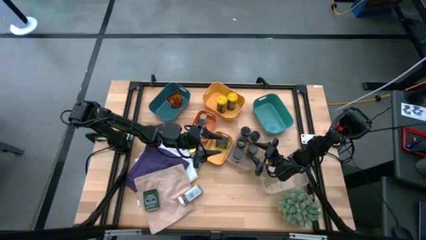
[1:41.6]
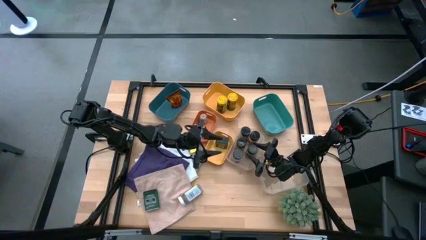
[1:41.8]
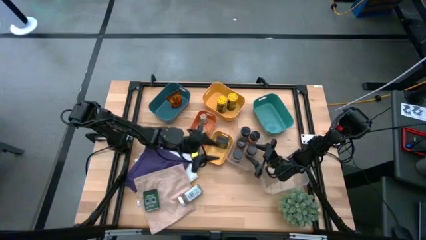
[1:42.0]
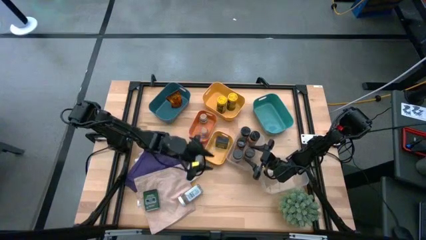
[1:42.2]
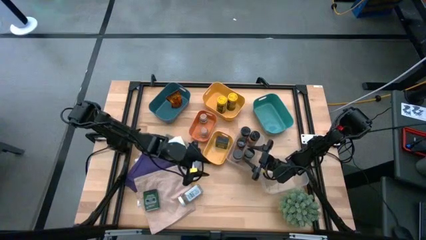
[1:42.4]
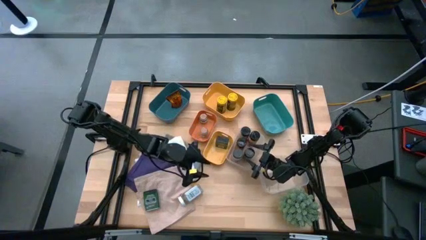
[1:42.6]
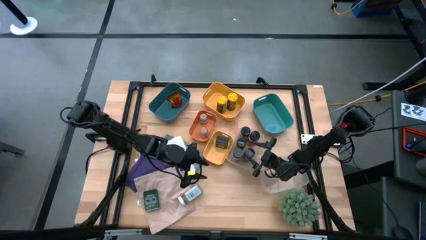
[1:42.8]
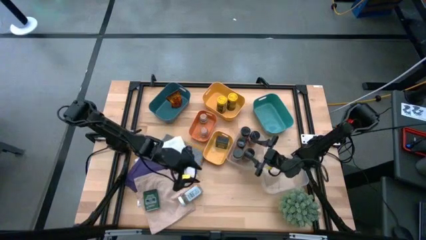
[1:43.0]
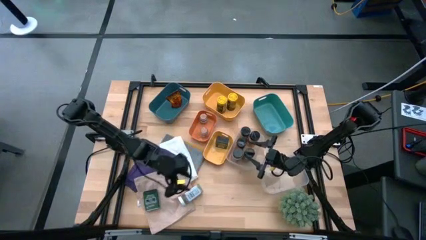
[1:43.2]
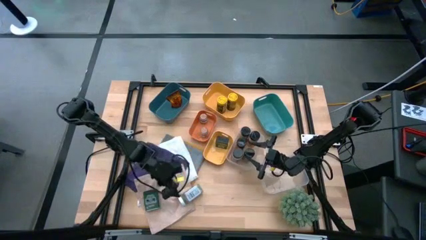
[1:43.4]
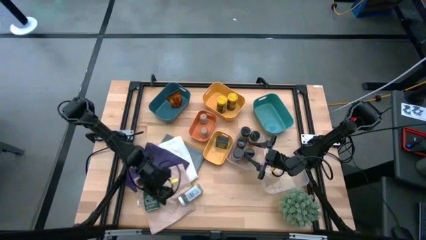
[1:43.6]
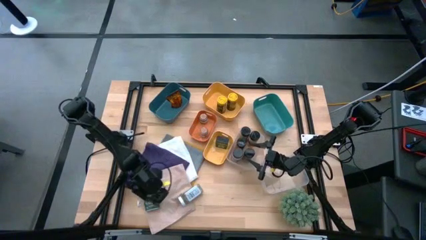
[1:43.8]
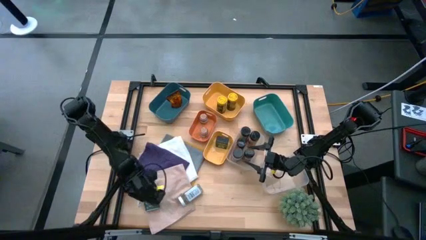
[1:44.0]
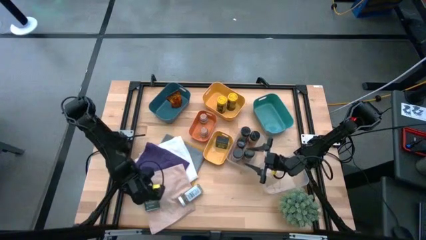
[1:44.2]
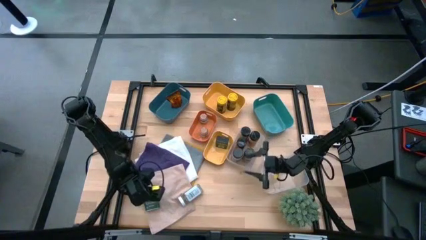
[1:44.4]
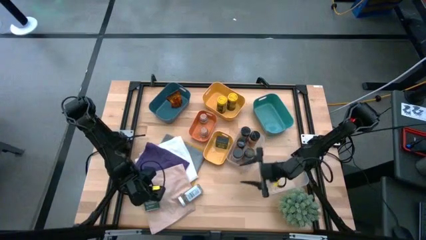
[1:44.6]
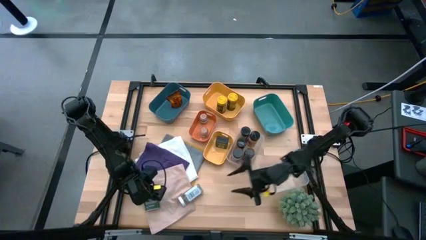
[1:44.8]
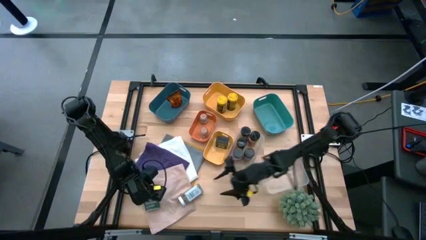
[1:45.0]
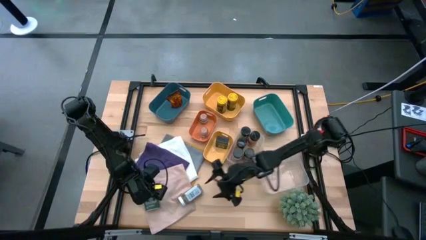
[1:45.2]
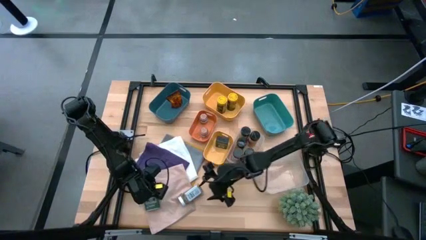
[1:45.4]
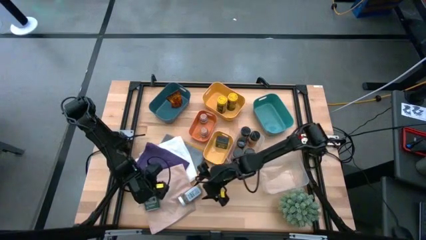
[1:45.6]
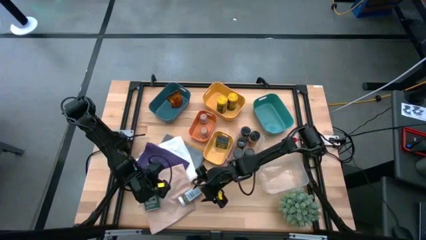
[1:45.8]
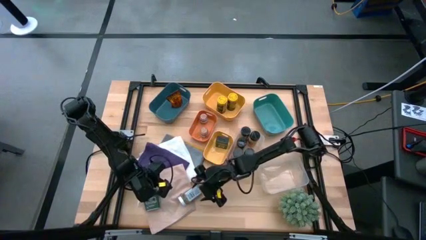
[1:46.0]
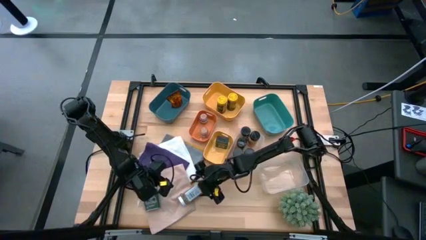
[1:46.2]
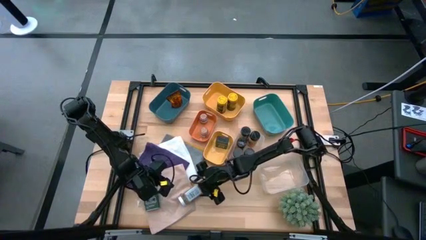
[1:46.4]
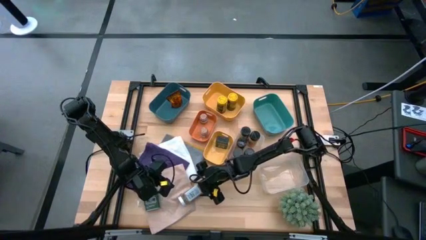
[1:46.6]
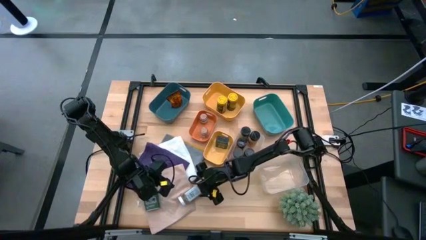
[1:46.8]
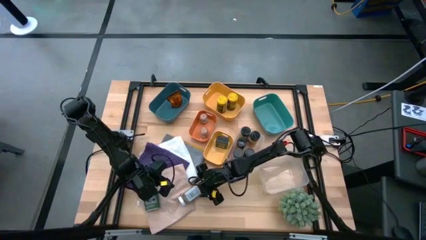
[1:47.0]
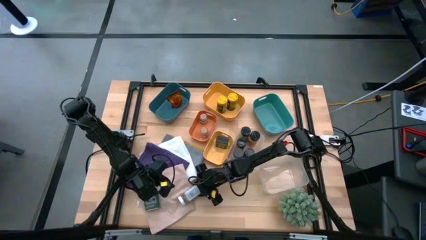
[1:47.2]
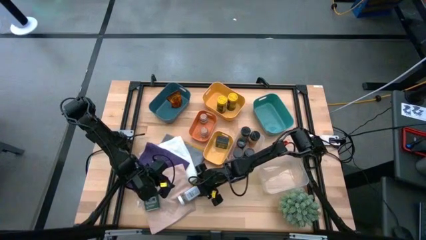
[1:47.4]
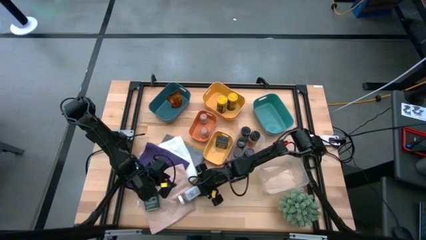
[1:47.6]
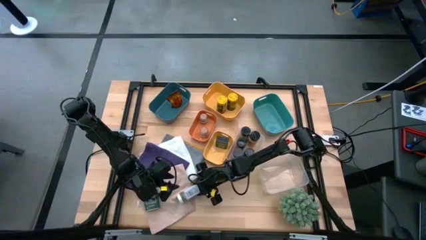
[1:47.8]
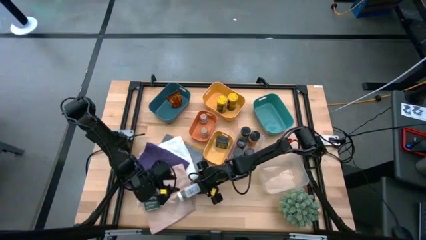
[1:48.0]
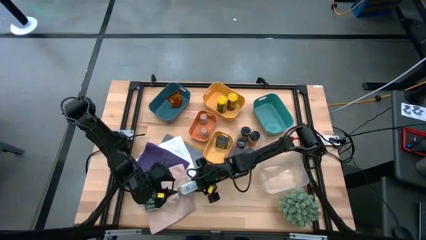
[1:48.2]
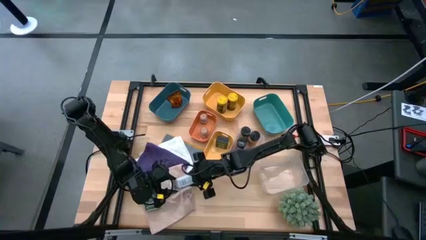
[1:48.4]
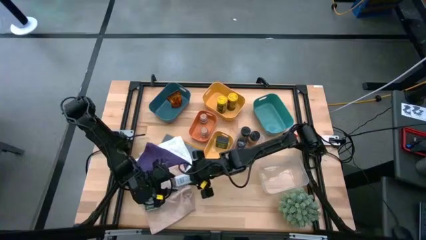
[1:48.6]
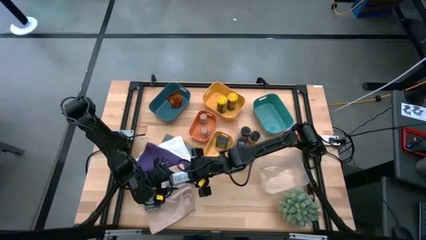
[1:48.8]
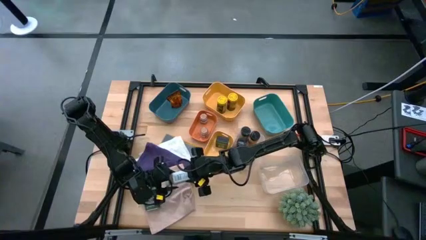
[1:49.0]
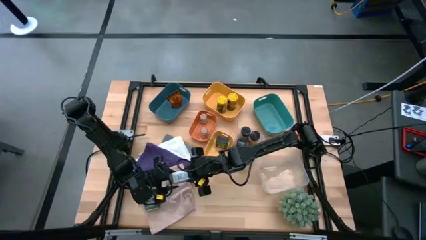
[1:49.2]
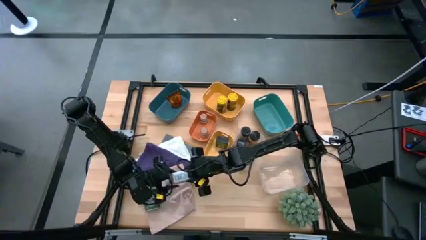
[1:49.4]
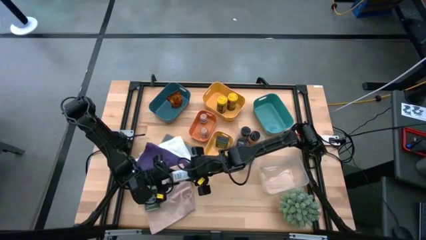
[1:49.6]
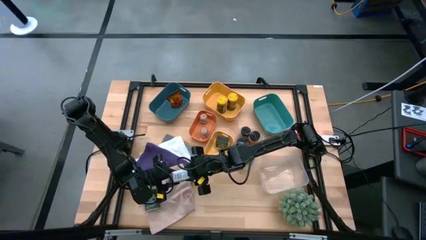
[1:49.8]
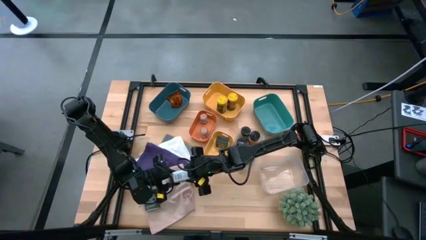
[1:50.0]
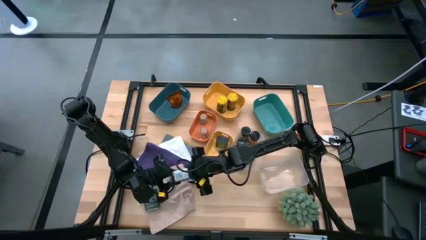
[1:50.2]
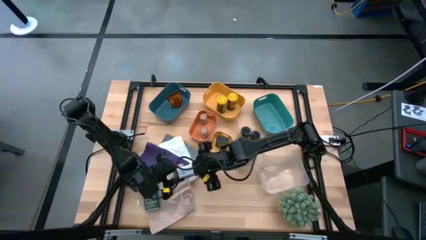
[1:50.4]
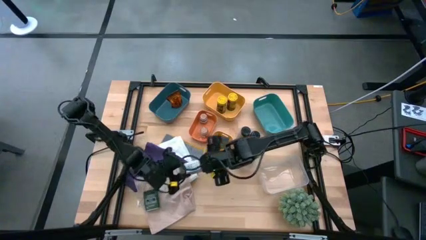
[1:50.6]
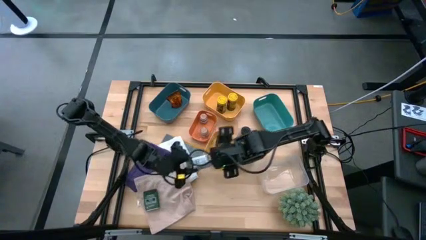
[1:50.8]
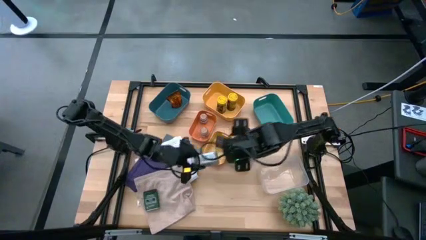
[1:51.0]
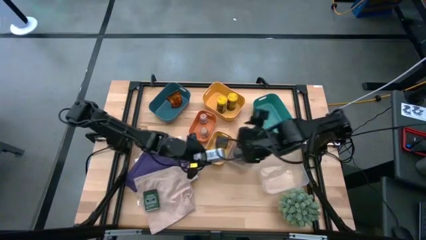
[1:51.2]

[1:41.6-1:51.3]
Task: Sort spices by type
Put the white seasoning bottle into the green bin

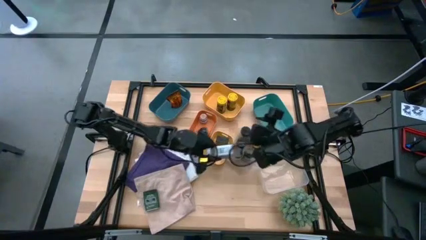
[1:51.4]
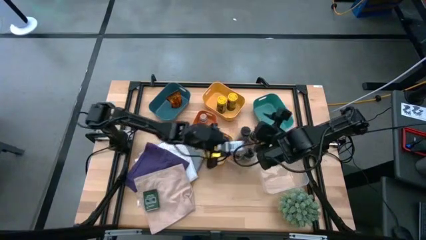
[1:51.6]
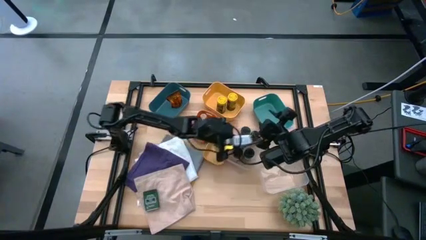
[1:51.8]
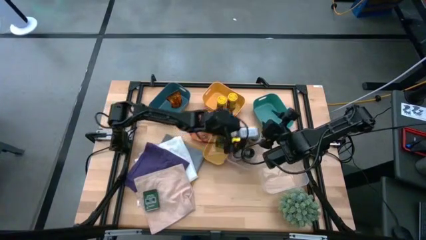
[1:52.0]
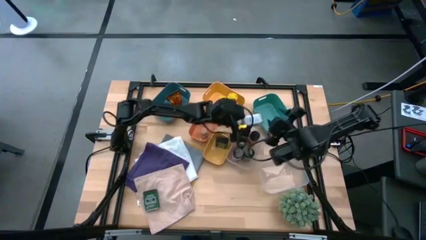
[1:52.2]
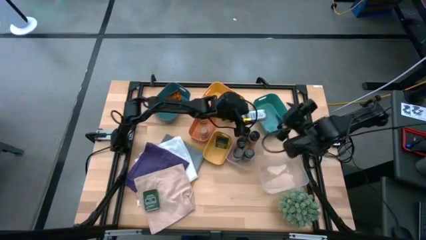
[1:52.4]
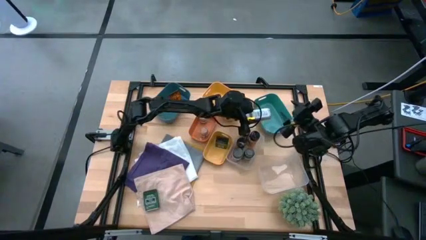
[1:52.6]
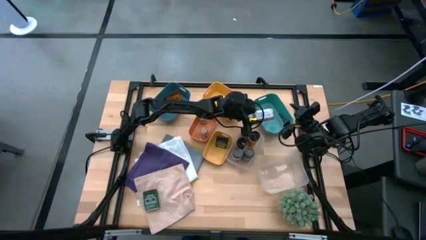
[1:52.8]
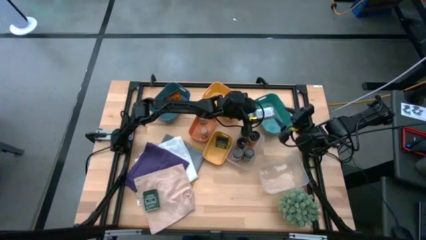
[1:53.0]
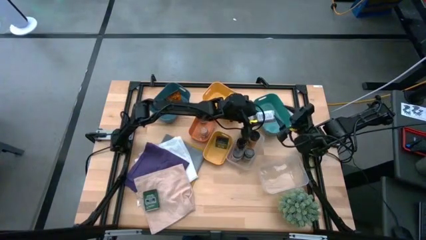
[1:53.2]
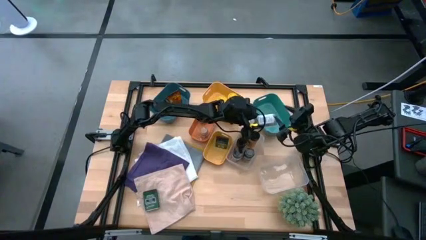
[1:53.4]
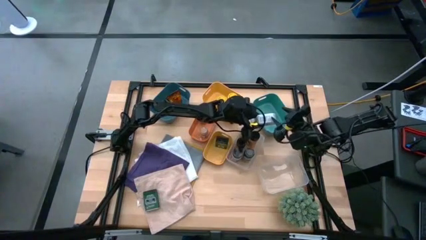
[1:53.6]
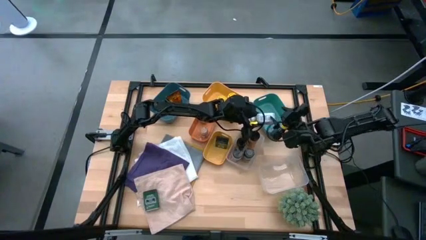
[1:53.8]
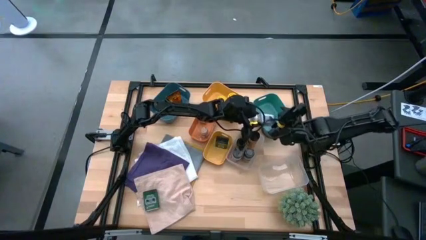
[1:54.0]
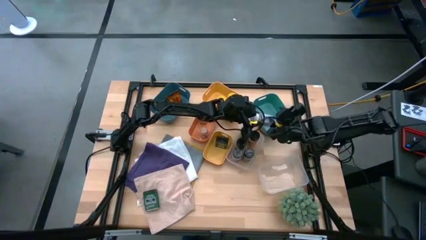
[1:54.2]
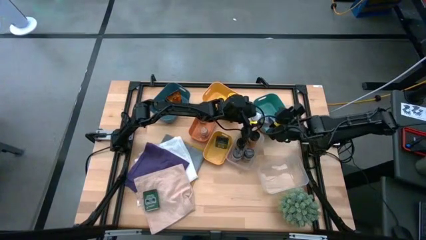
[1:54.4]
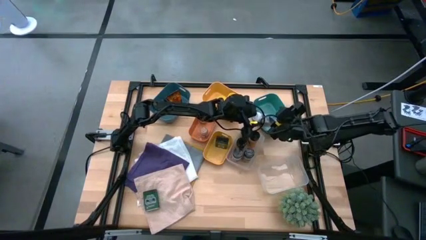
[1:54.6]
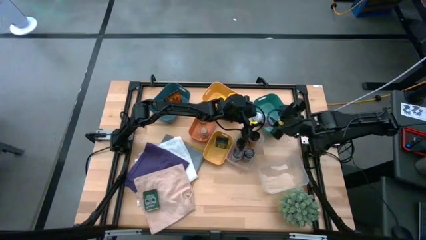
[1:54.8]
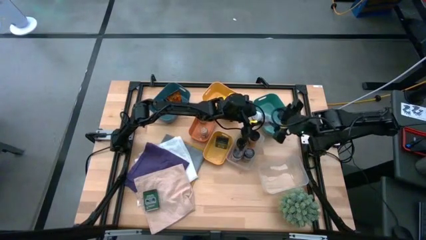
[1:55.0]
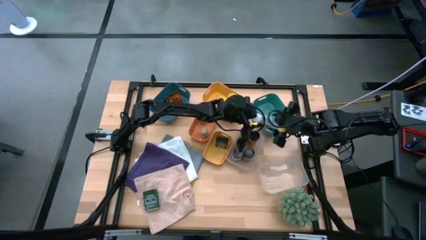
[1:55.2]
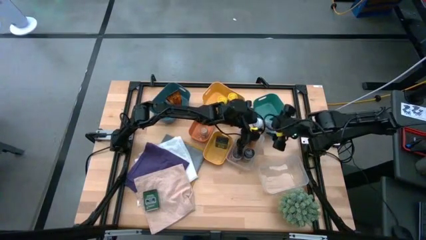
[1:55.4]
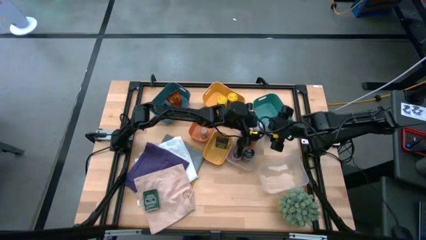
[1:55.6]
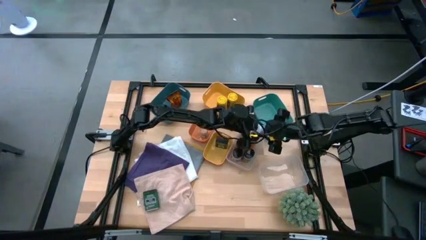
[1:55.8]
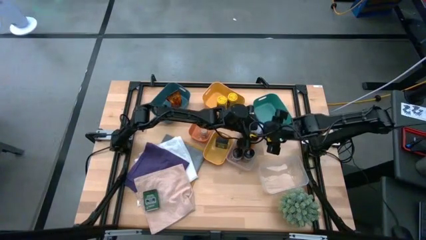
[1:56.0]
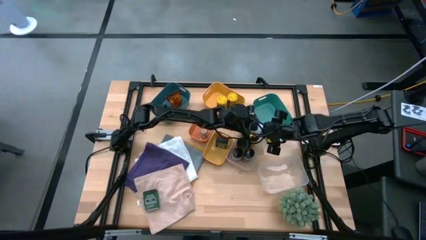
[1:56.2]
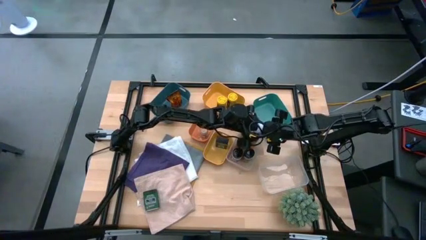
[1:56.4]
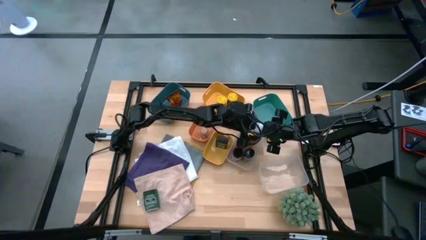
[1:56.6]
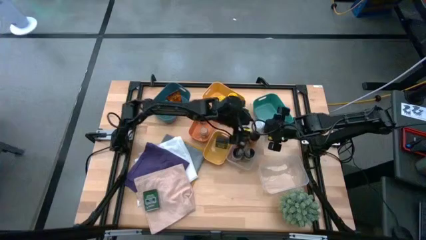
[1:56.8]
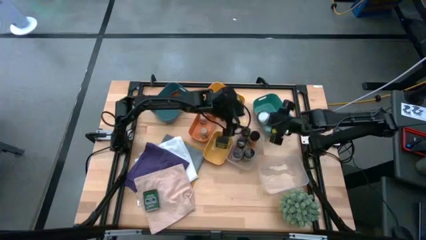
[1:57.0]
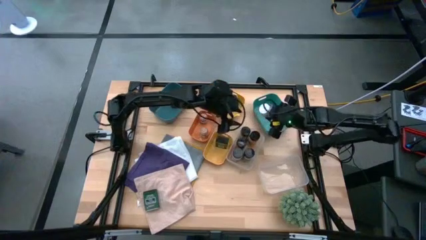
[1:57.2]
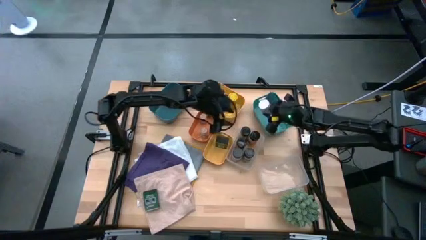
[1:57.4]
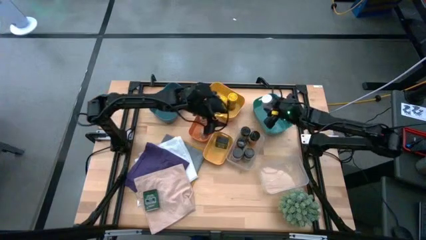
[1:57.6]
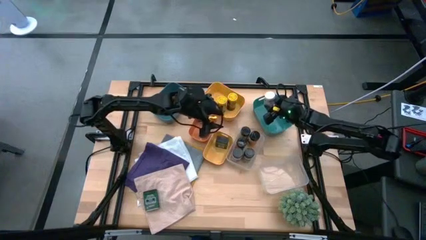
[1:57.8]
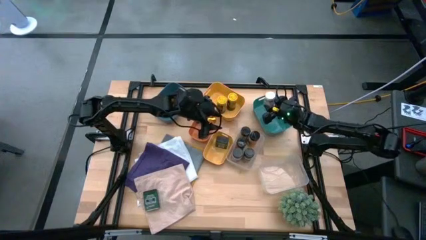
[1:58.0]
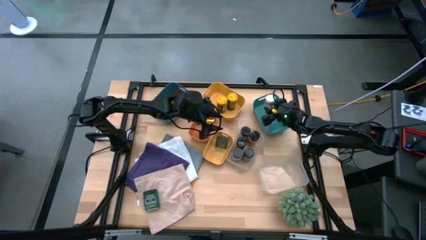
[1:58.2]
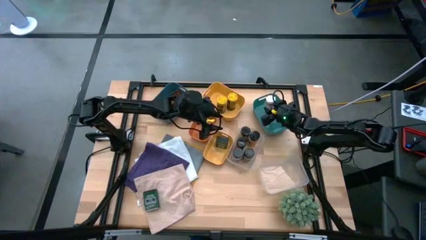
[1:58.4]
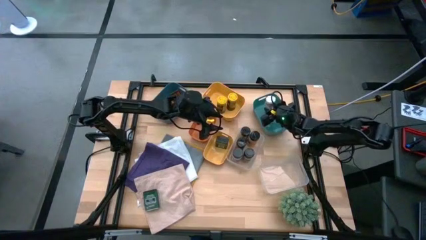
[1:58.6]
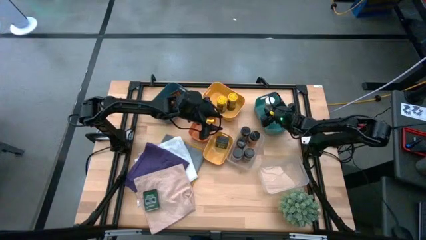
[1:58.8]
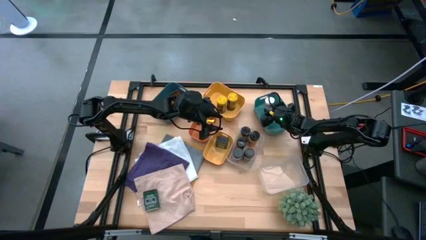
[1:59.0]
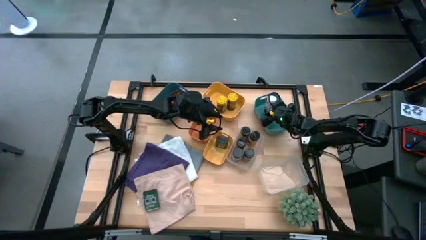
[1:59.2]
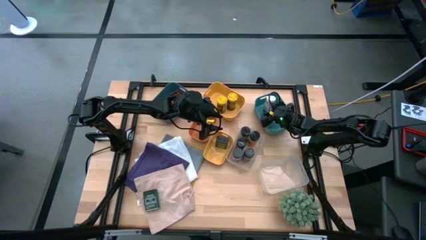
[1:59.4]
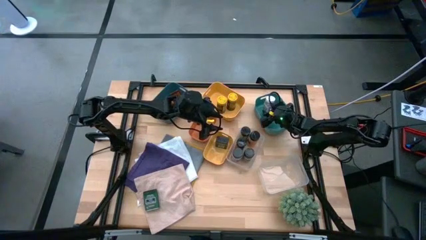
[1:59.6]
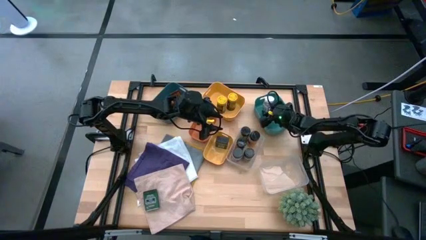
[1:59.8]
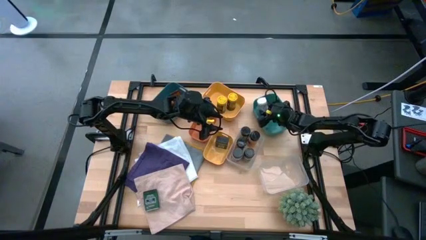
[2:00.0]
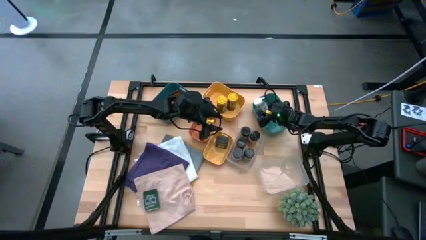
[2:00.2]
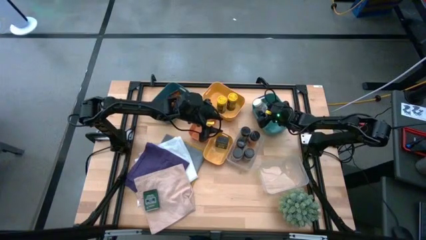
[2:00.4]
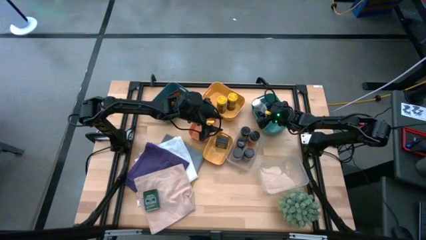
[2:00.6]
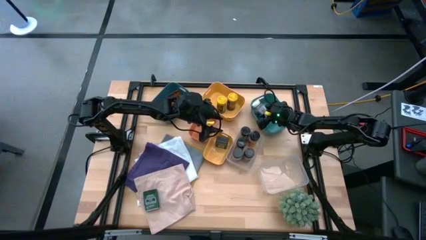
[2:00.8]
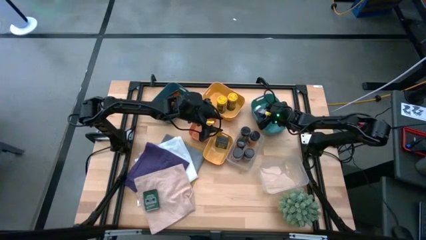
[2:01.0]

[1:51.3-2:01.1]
Put the white seasoning bottle into the green bin
